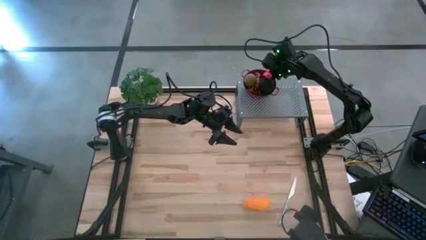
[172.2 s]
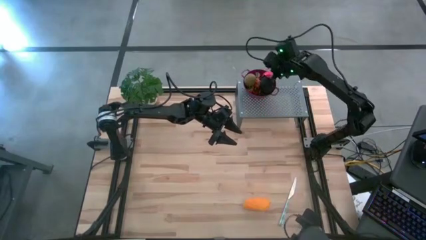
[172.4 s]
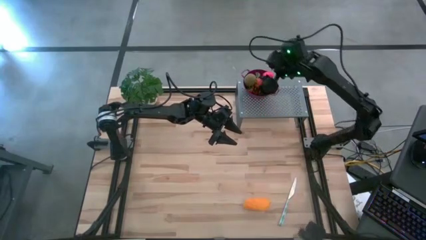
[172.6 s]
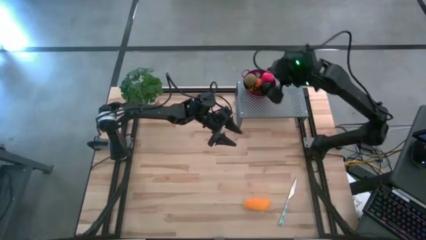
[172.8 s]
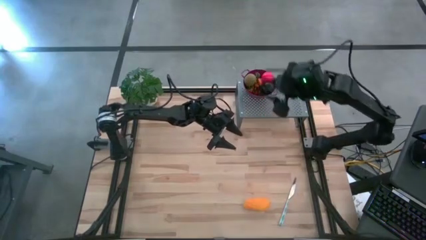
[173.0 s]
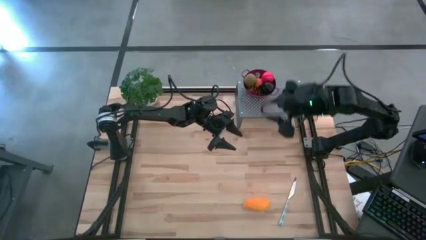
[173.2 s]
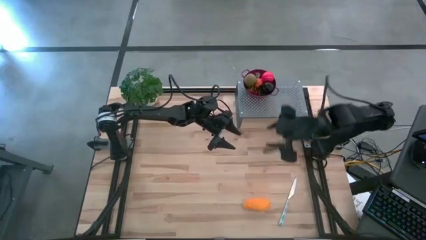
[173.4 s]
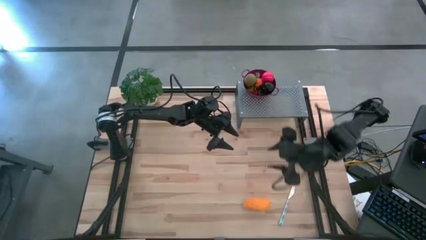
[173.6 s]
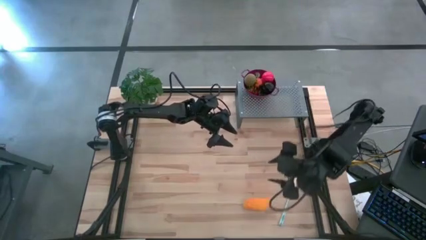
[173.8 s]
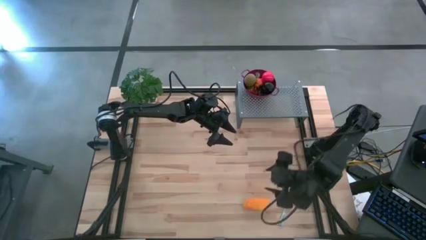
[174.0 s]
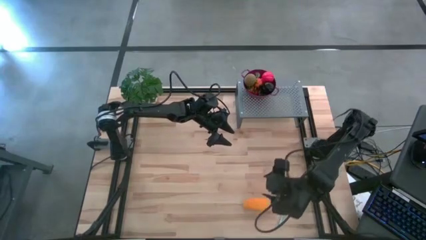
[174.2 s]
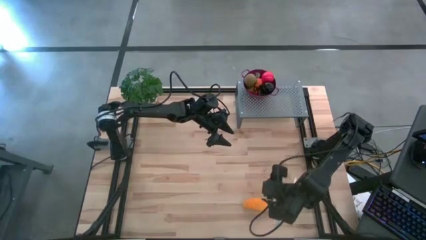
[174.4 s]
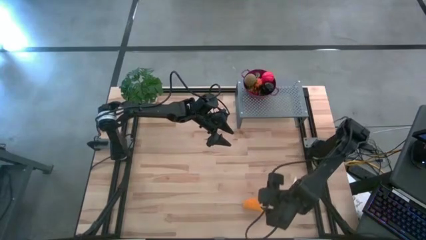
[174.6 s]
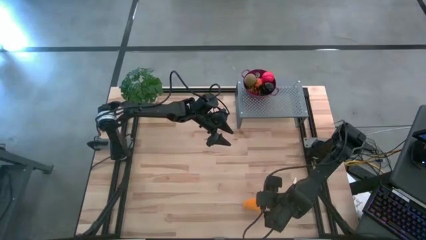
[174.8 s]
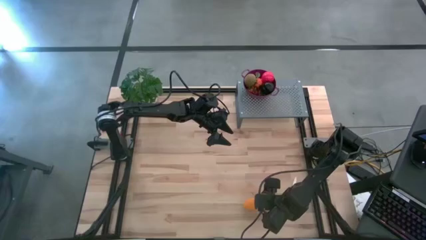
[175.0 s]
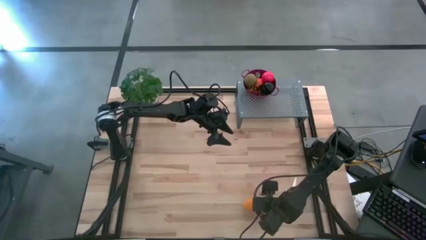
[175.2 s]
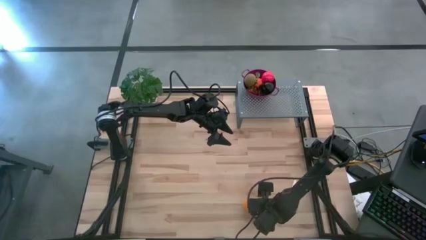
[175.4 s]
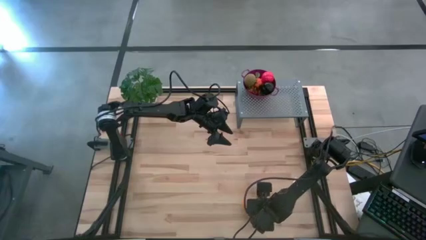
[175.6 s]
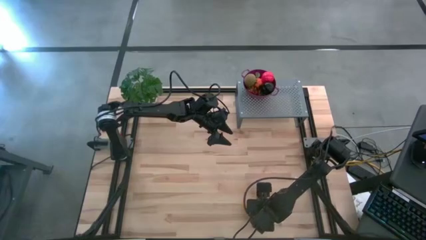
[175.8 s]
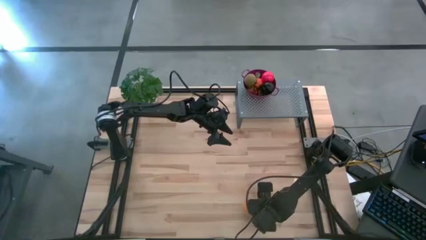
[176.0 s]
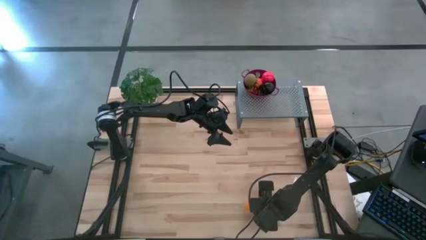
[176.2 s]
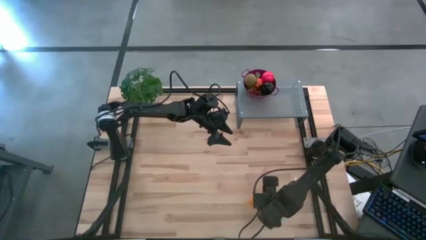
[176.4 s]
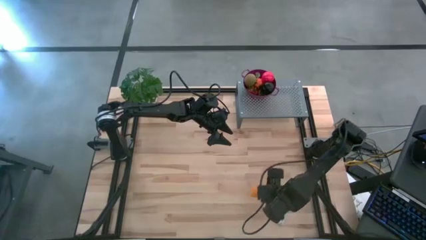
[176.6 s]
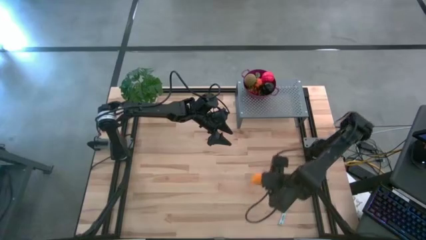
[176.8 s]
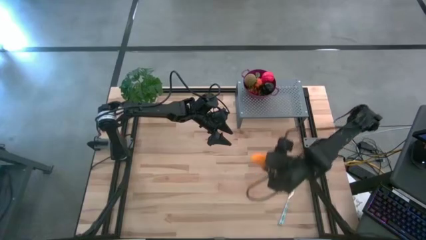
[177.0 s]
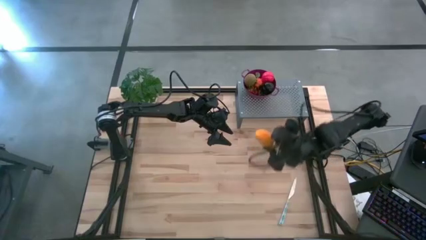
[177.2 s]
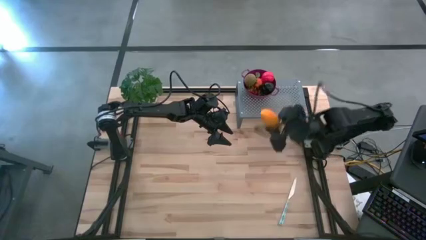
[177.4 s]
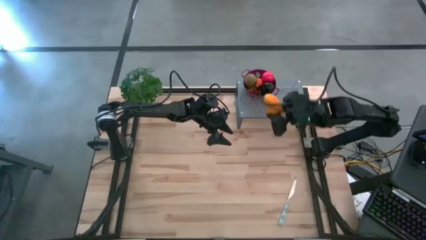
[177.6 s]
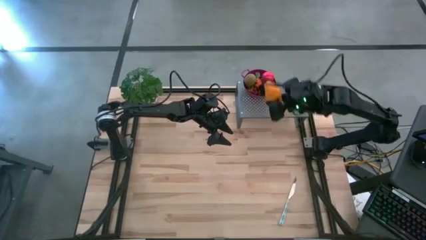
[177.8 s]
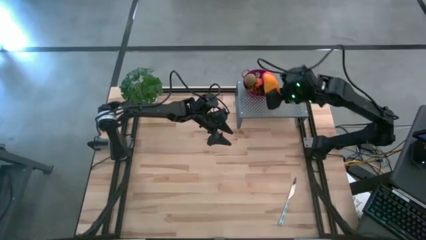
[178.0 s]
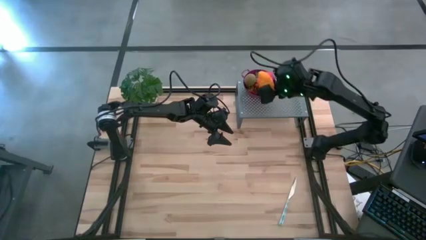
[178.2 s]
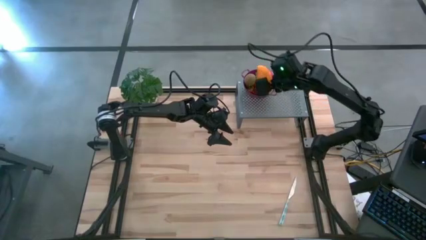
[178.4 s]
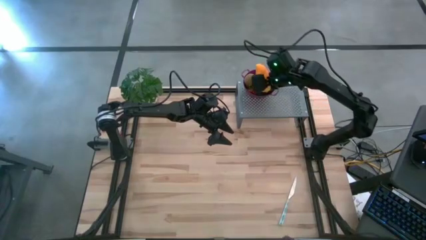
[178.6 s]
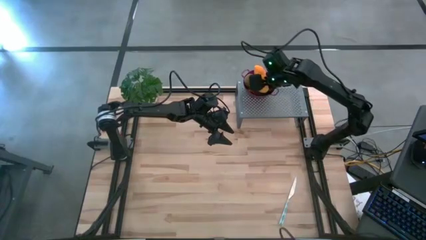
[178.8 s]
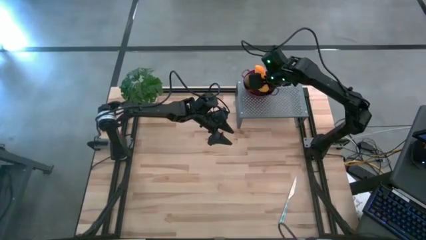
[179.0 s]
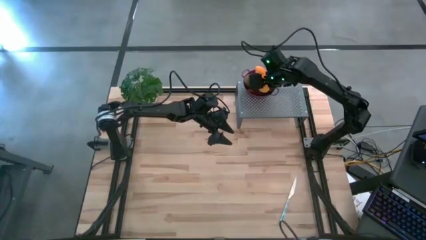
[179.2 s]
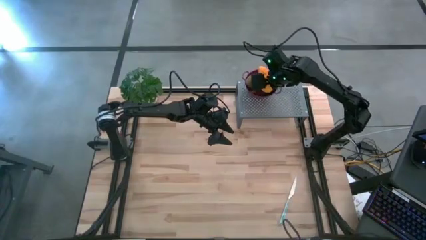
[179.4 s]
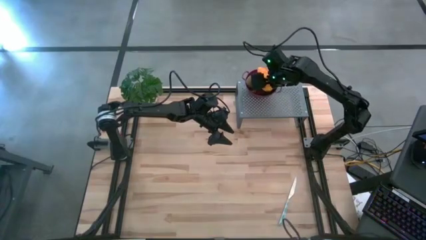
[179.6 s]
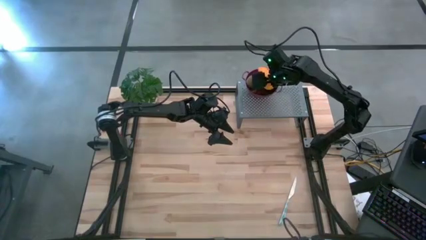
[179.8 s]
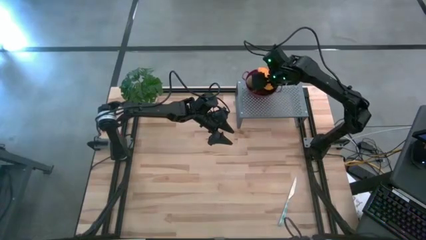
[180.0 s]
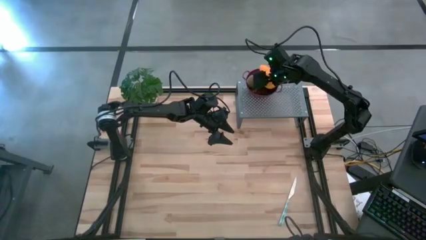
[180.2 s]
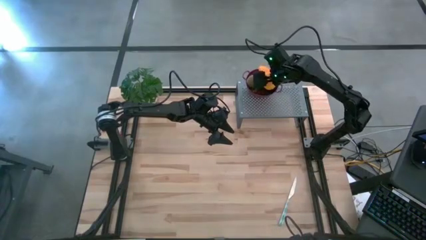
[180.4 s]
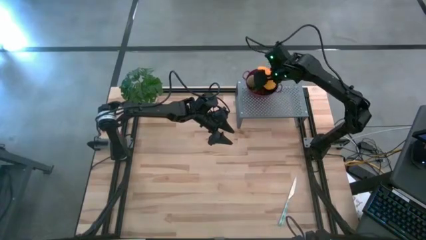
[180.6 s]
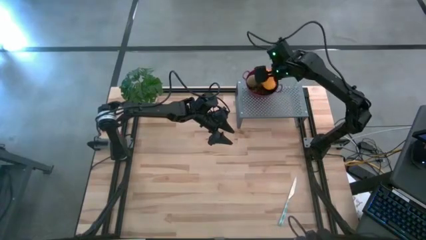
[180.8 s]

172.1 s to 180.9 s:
Task: Pick & Place Fruit
Put the mango into the violet strainer bowl on the shelf

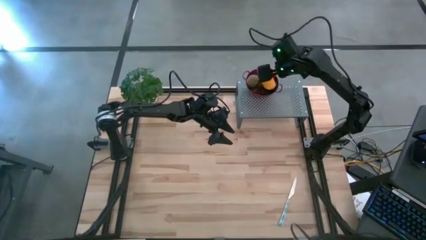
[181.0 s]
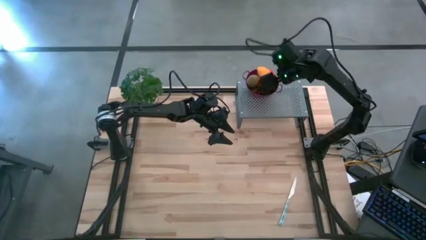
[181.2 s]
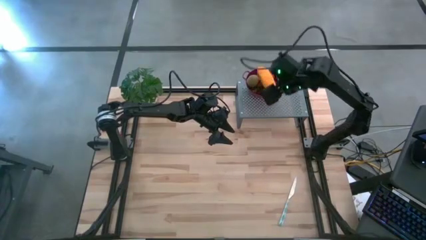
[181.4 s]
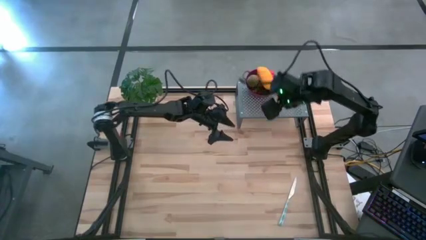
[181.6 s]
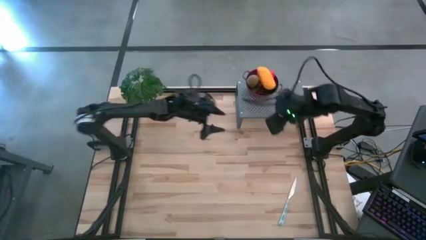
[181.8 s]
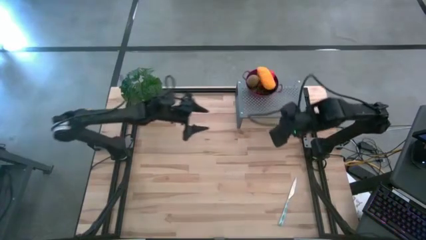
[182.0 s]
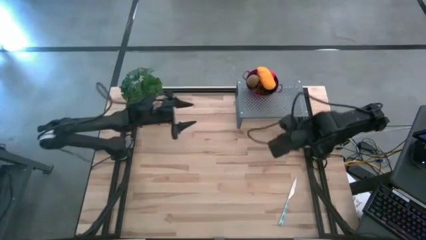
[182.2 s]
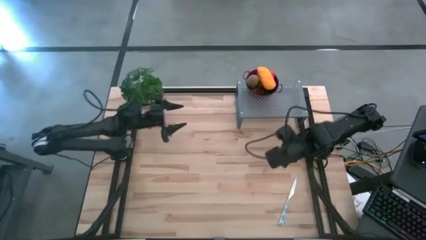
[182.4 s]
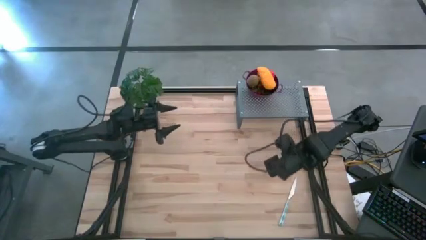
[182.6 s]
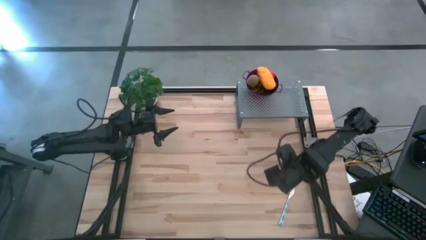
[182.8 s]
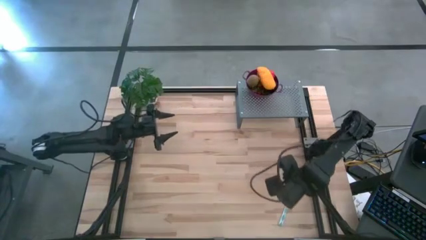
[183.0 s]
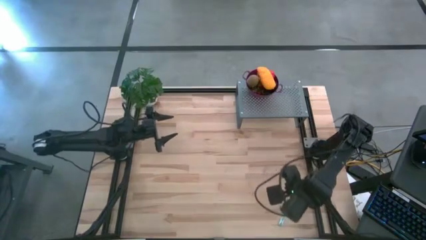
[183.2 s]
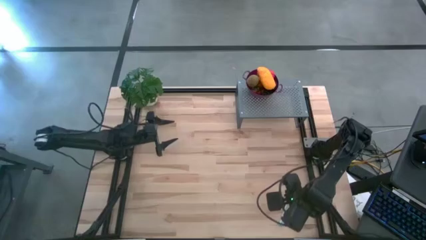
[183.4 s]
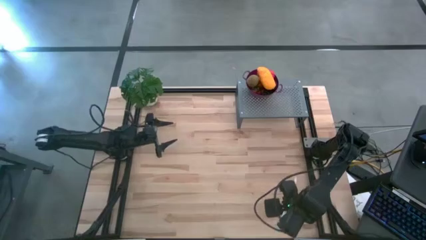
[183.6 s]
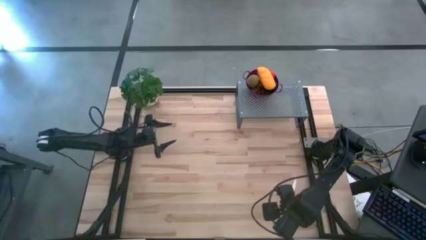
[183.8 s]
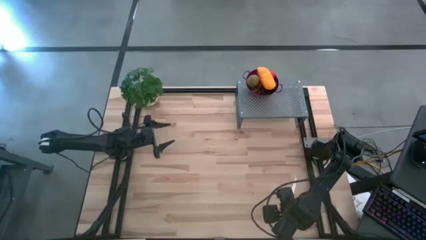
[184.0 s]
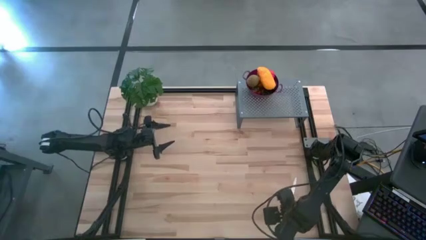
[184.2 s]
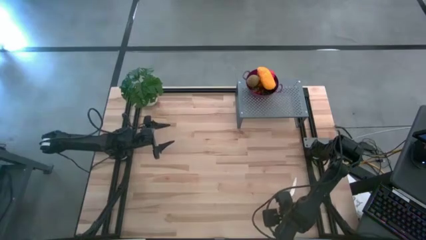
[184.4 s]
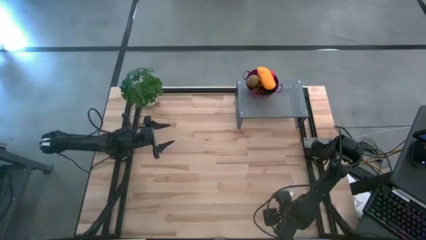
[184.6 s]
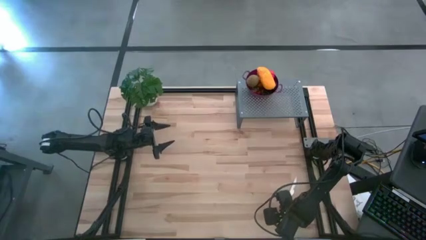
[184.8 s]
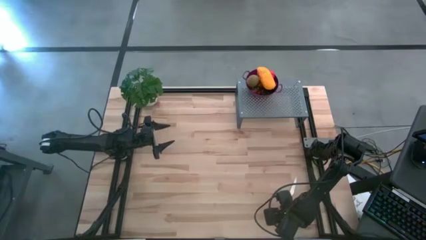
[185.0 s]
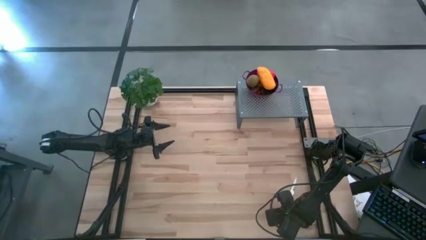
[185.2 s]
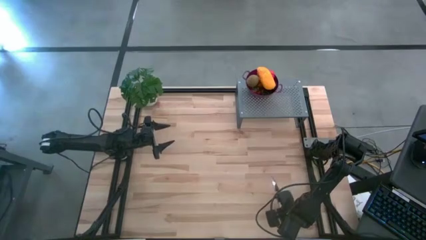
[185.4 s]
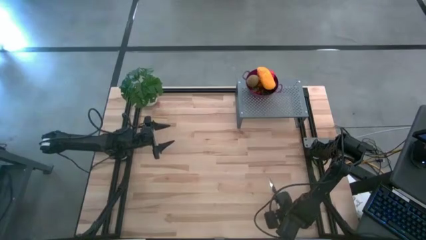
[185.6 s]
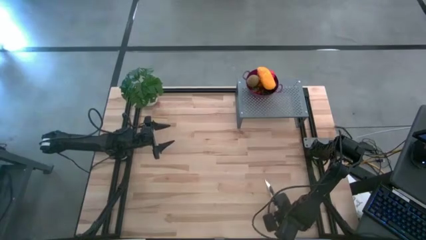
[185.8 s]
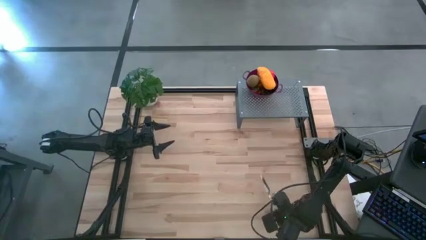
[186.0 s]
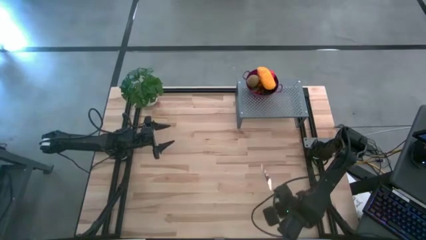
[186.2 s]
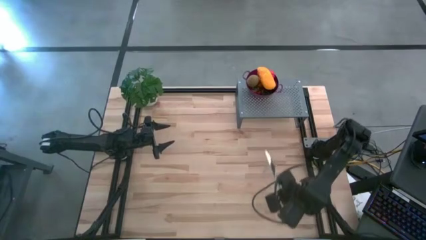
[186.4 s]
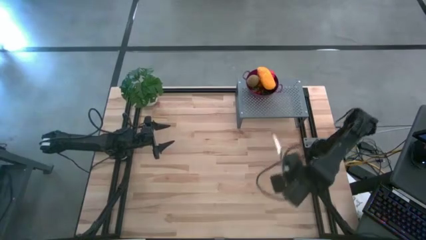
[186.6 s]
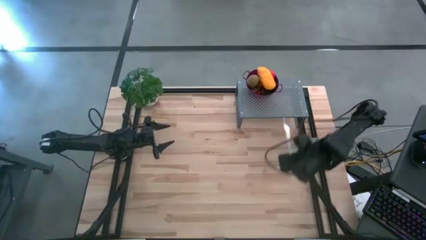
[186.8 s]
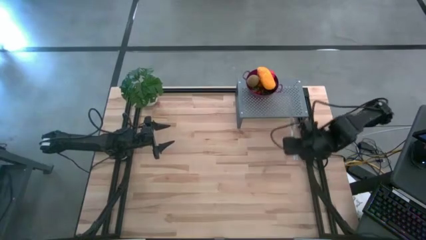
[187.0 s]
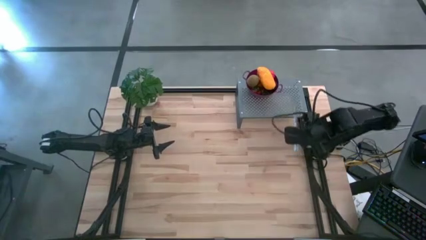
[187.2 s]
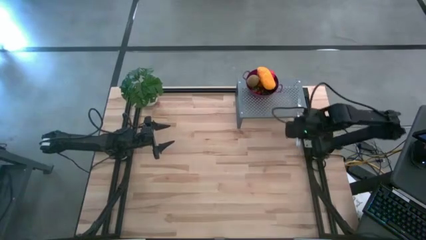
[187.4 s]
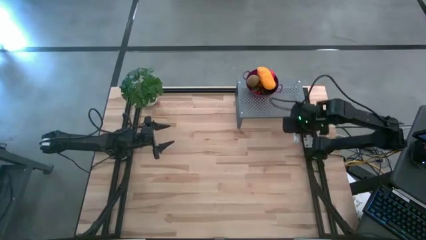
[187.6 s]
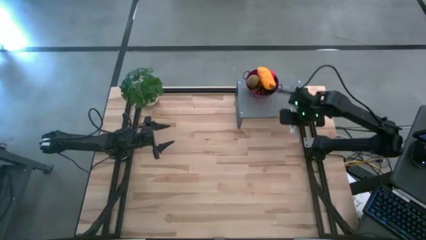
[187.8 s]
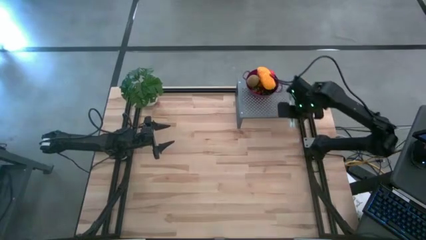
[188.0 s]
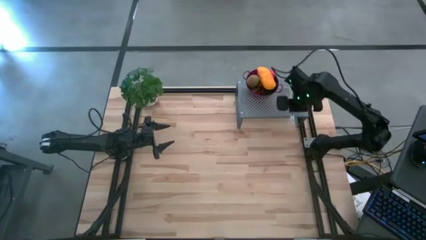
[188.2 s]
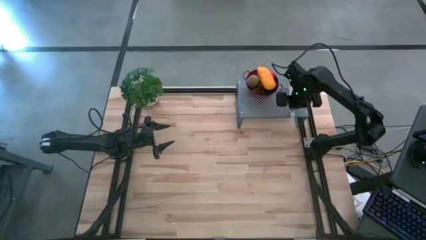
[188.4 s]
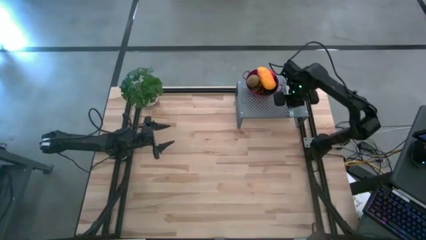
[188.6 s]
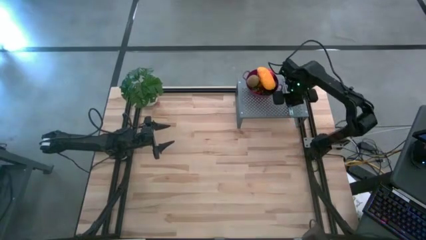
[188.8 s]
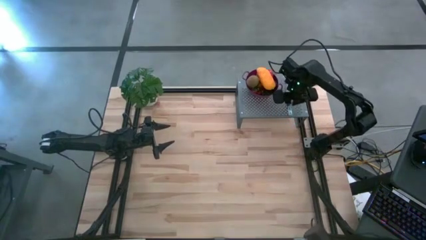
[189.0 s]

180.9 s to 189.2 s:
Put the blue knife on the shelf
